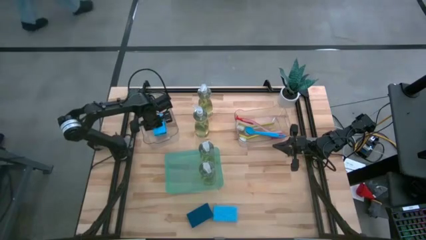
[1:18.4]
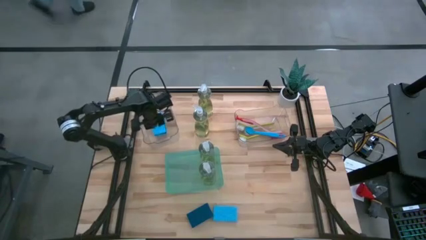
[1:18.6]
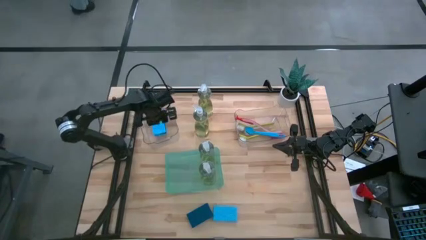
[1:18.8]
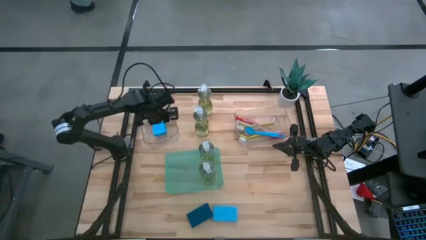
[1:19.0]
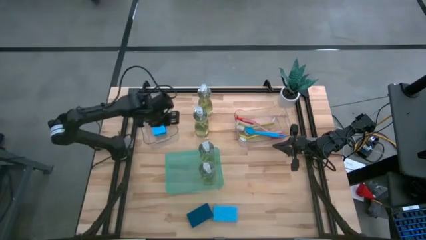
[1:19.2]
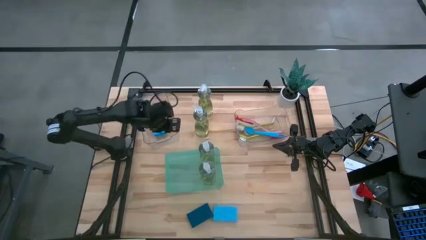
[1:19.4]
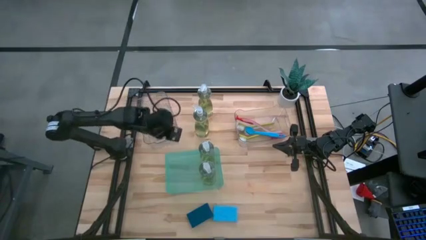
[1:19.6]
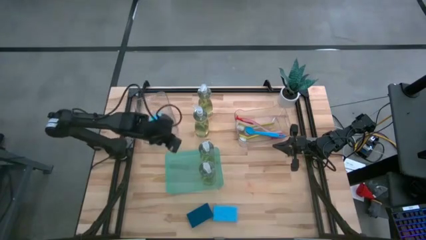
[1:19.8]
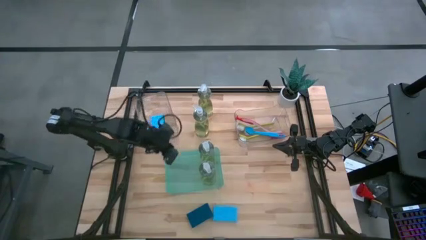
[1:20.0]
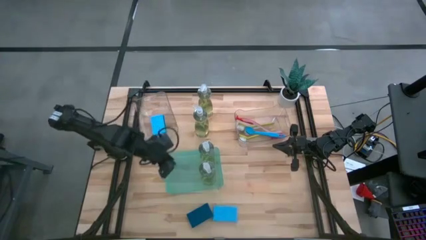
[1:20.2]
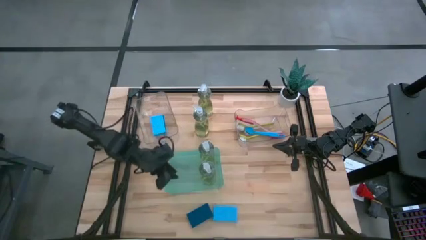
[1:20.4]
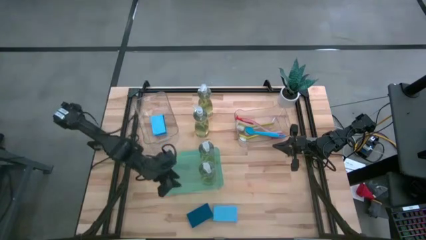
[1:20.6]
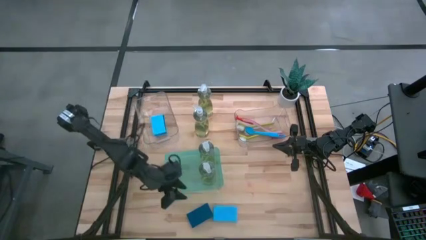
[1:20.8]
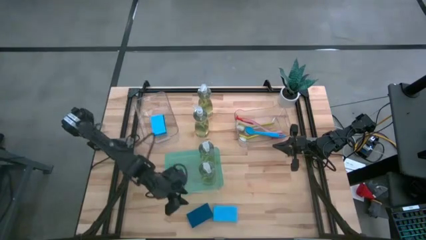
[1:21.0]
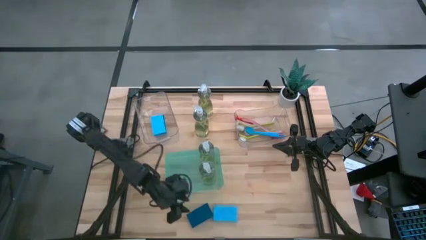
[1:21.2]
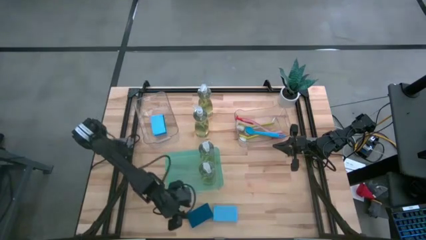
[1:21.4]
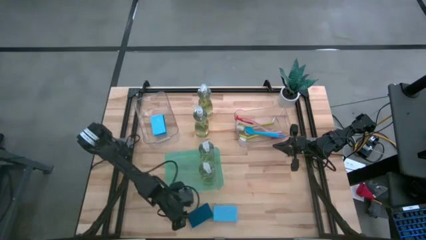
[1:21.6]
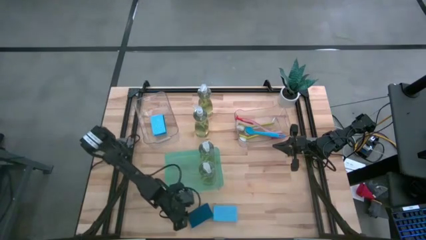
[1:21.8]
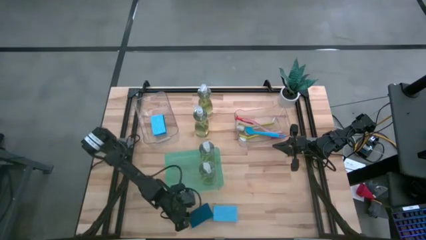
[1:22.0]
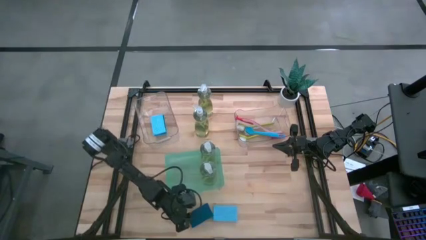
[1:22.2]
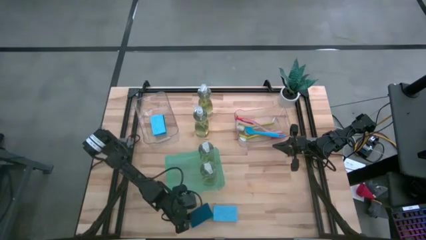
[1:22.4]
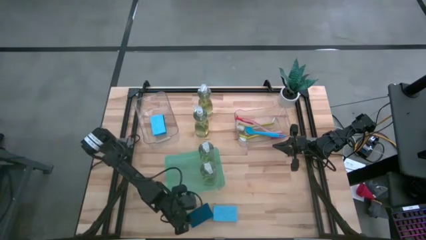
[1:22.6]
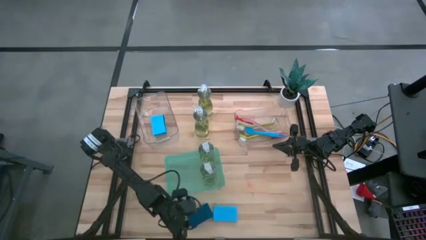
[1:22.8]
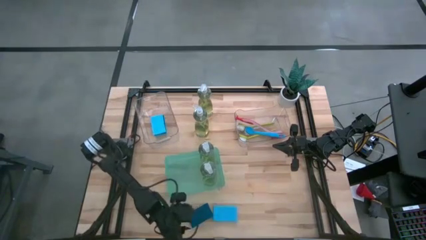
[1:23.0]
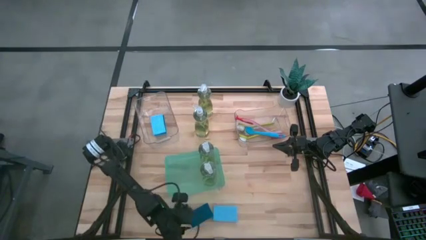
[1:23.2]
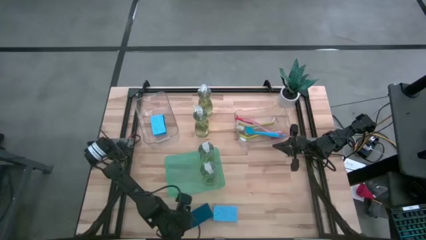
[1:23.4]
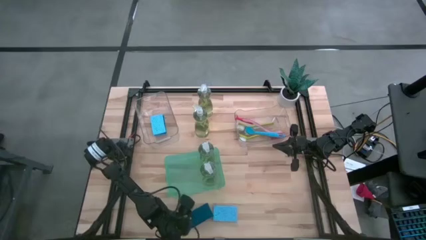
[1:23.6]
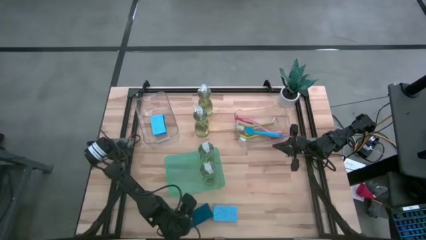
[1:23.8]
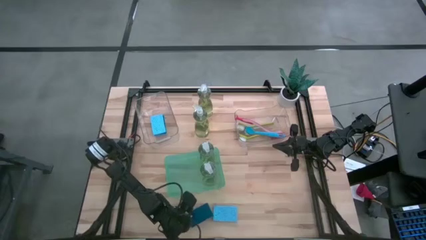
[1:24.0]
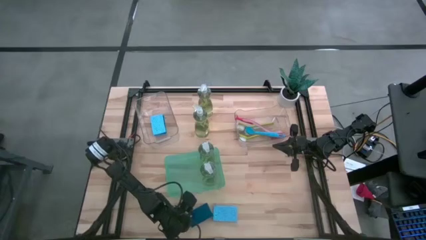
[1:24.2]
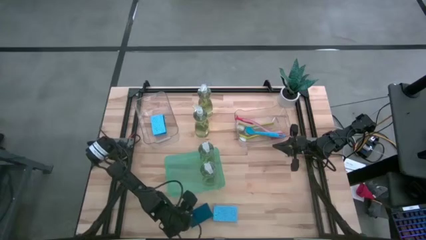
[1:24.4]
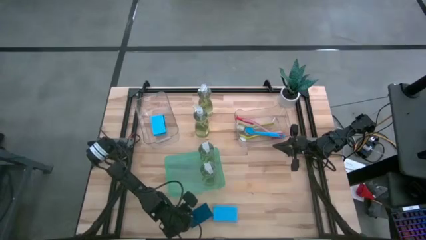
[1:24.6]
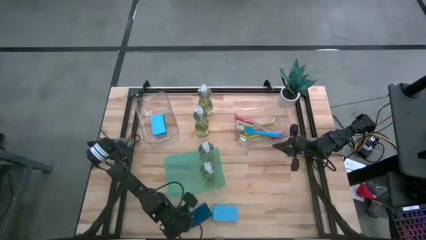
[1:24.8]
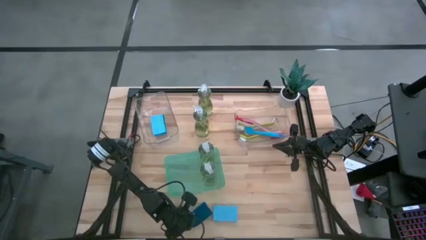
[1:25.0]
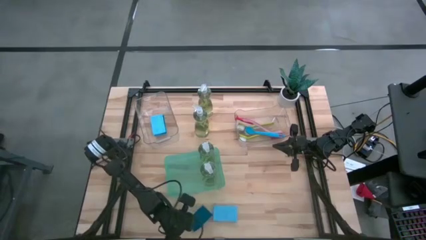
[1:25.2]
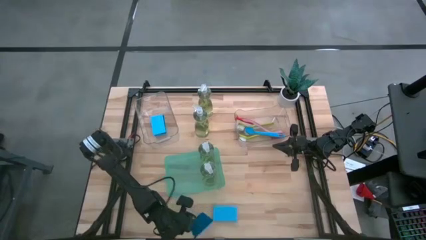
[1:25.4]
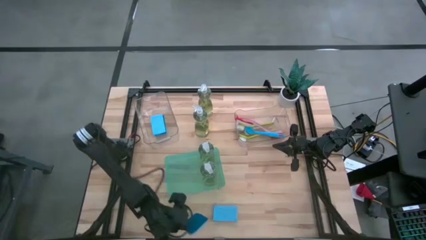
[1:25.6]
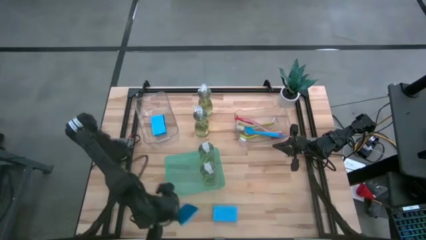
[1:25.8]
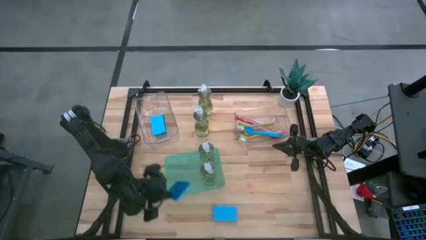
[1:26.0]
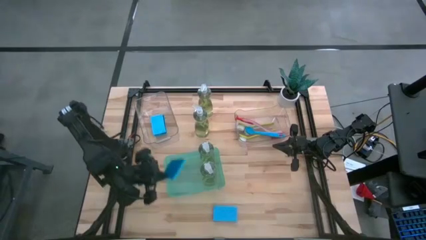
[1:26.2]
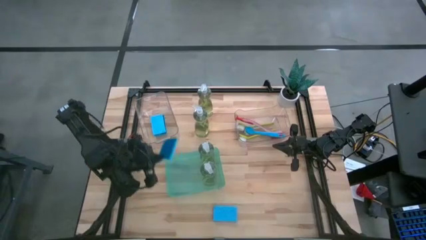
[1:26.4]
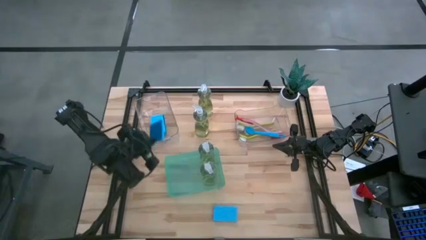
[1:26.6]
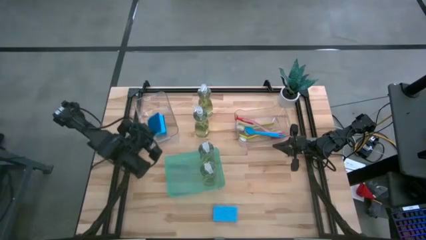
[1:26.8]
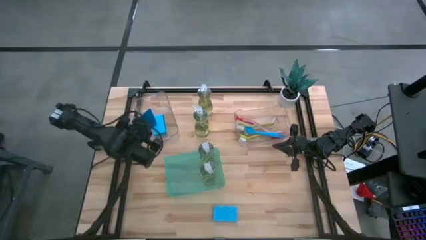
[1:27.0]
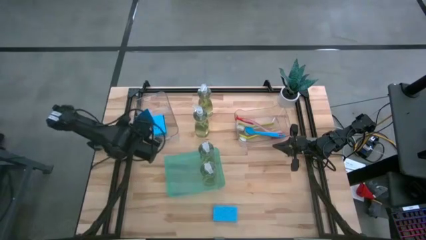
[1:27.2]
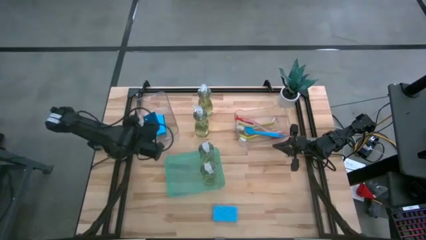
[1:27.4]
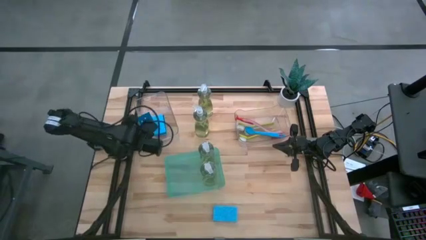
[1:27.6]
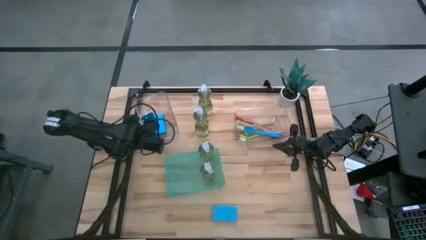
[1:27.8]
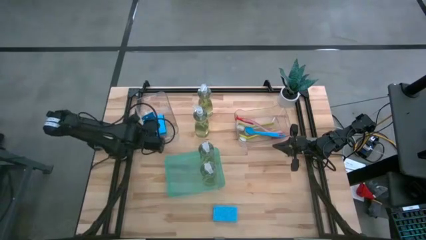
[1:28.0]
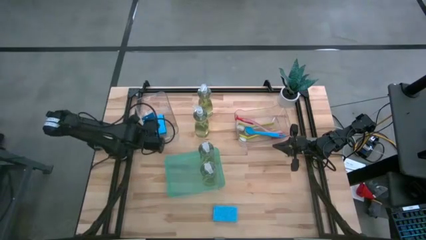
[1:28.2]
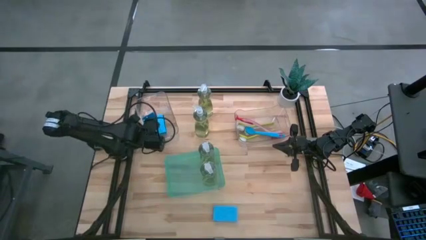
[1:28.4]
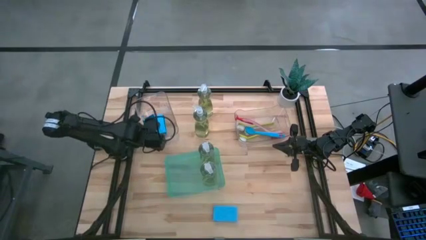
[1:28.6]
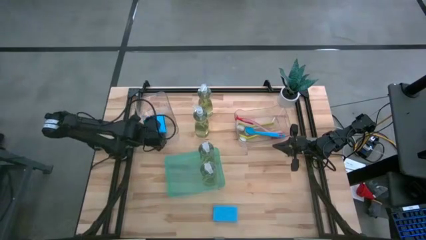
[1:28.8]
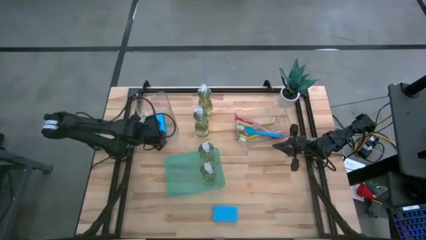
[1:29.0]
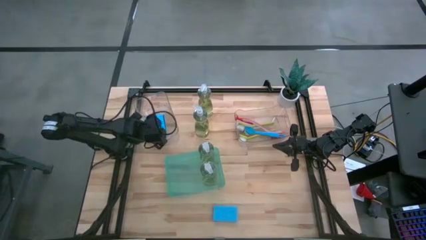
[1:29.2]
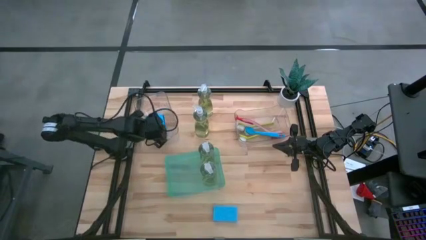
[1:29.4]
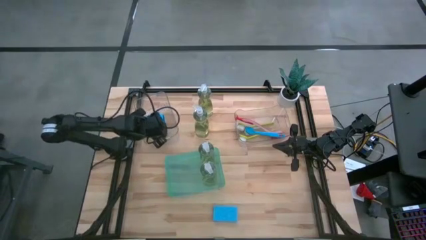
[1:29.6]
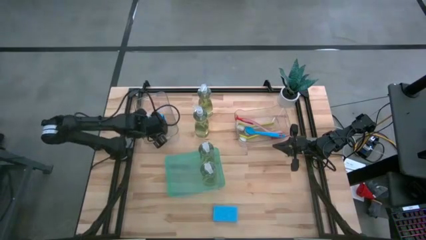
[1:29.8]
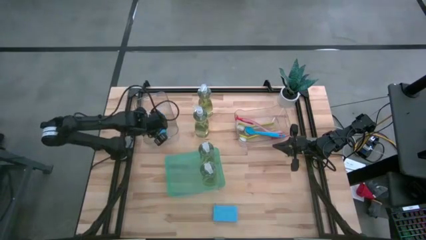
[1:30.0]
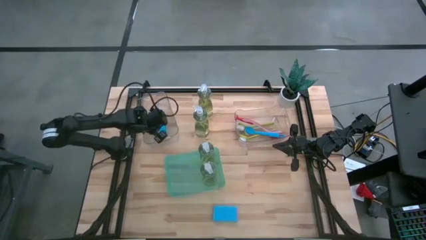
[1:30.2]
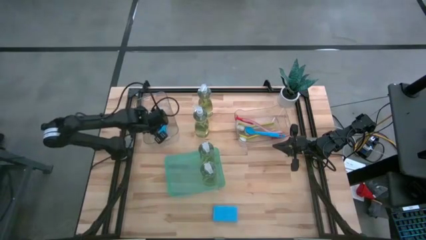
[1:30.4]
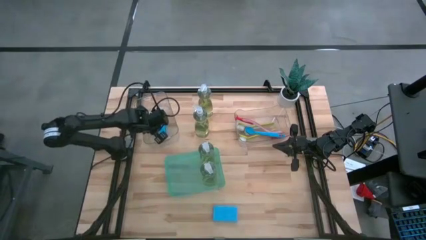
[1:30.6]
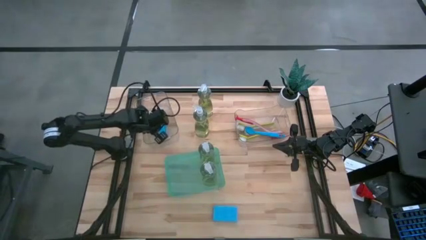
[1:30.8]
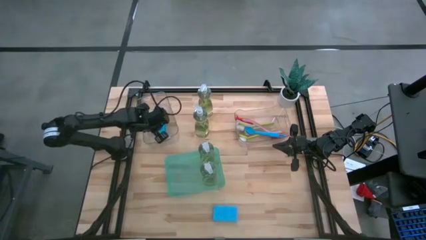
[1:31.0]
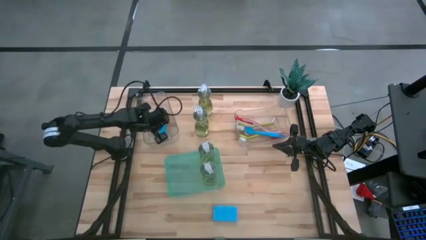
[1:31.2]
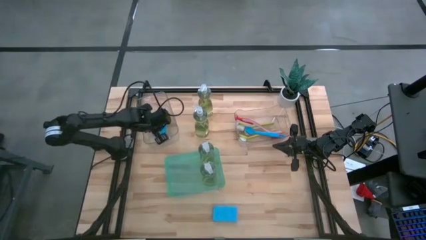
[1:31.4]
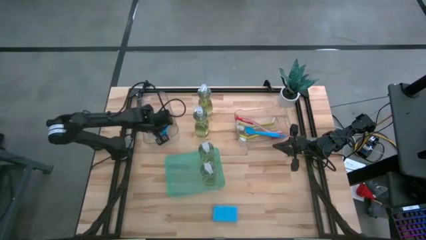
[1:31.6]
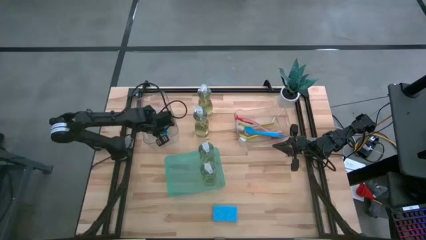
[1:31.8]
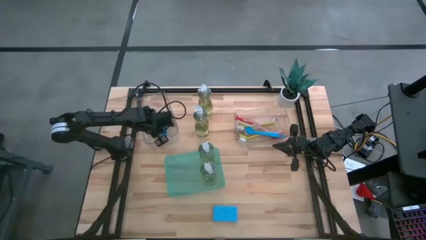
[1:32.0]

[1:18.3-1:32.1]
Task: Pick & Place Kitchen Sink Supplies
Put the blue sponge into the left transparent bin

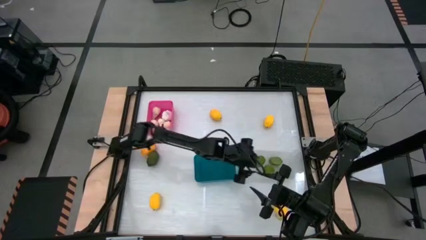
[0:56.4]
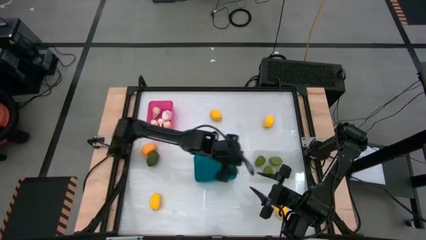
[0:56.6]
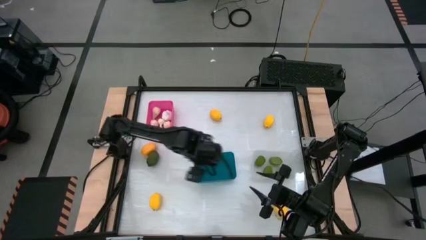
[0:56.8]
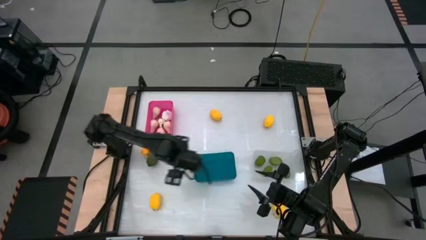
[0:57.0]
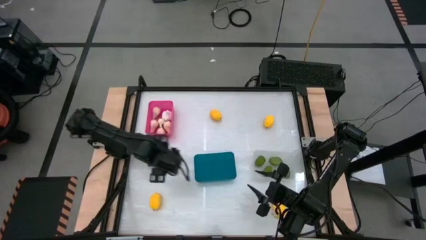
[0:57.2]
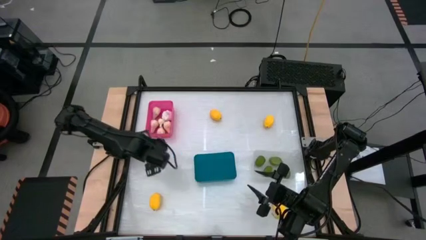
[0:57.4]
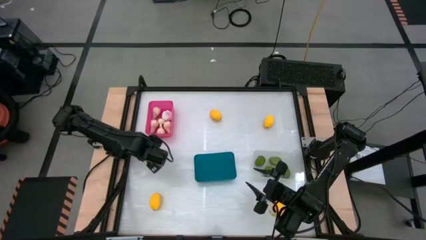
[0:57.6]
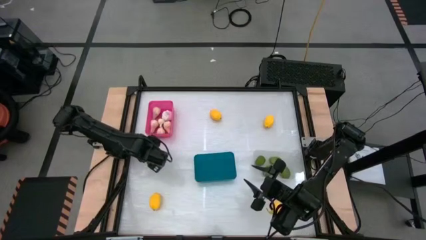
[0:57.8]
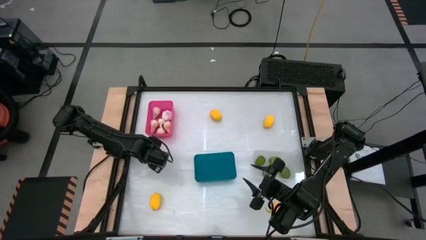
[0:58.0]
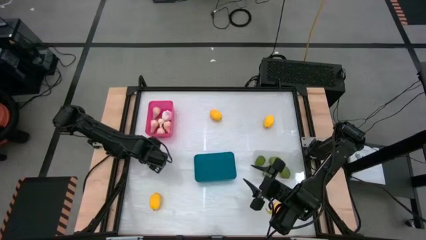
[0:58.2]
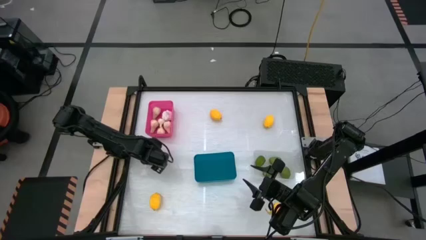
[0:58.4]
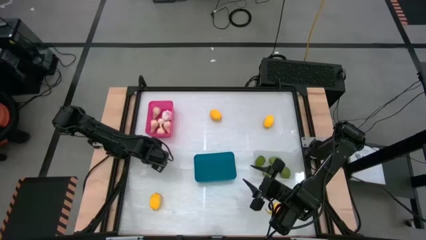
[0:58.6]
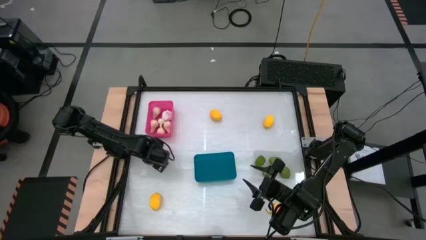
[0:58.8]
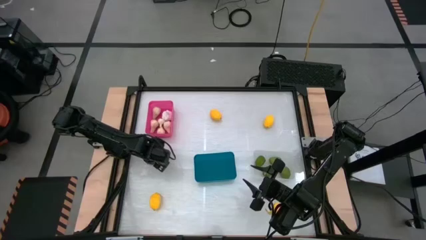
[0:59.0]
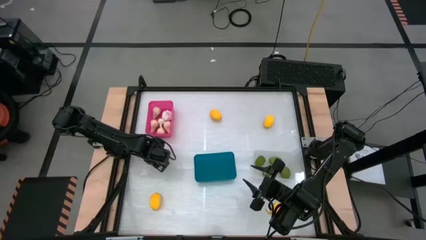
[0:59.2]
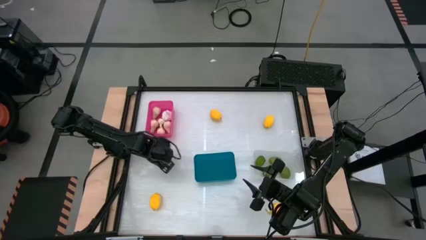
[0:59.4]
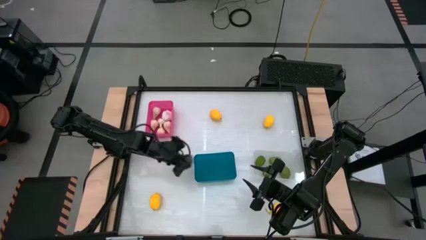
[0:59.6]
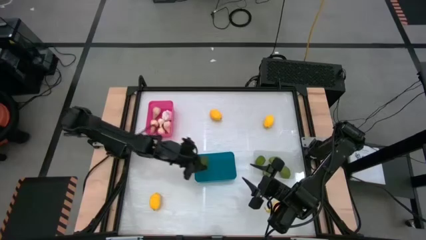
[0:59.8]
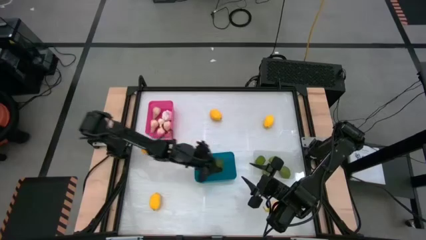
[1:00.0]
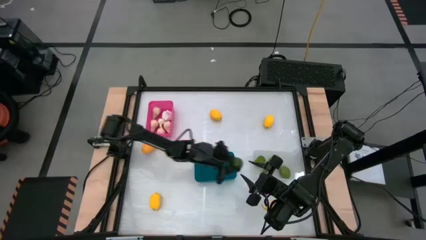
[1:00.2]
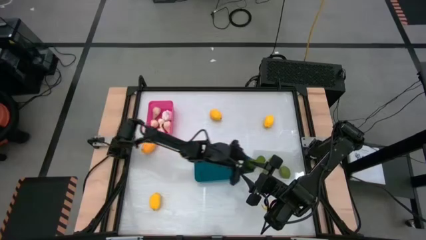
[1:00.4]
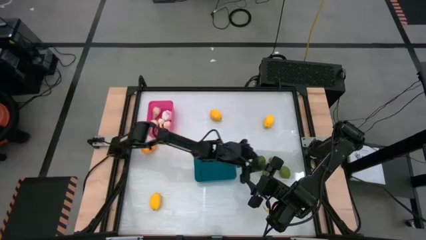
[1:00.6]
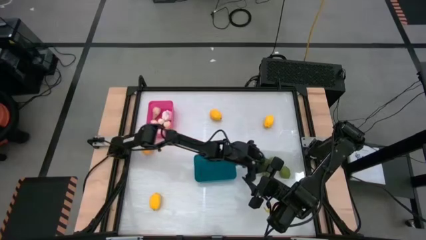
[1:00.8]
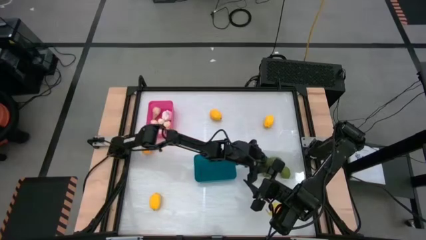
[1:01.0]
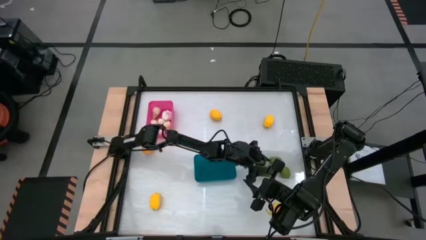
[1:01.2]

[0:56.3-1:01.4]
Task: Sort produce into baskets
Put the green lime into the white bin
